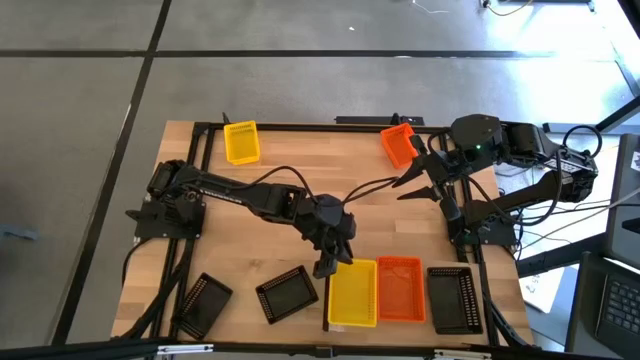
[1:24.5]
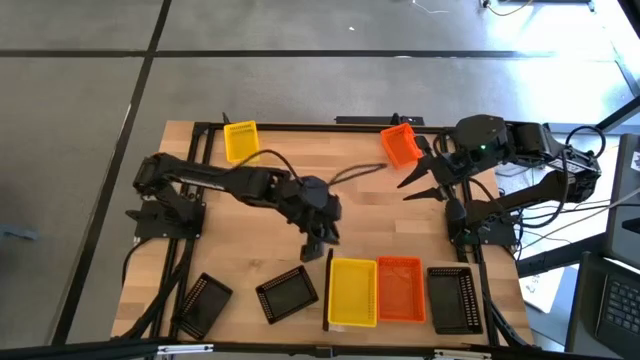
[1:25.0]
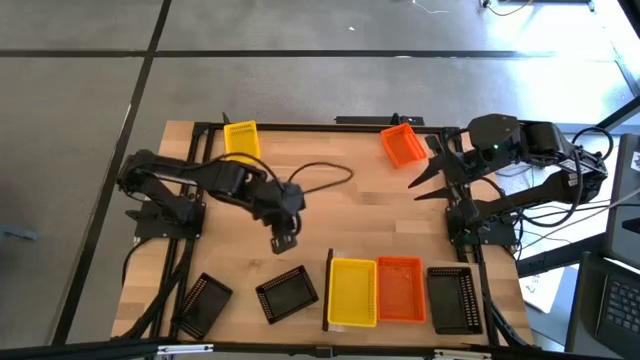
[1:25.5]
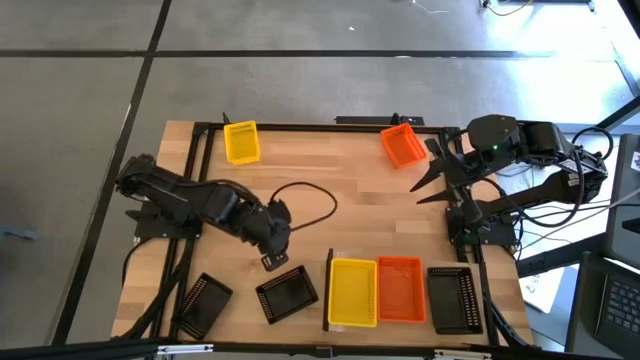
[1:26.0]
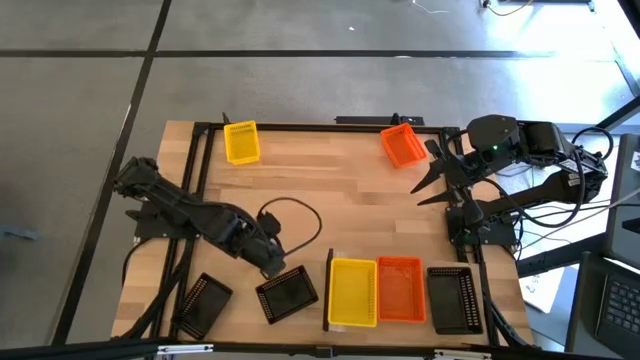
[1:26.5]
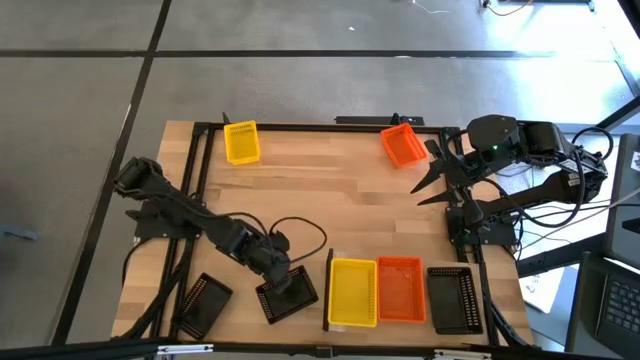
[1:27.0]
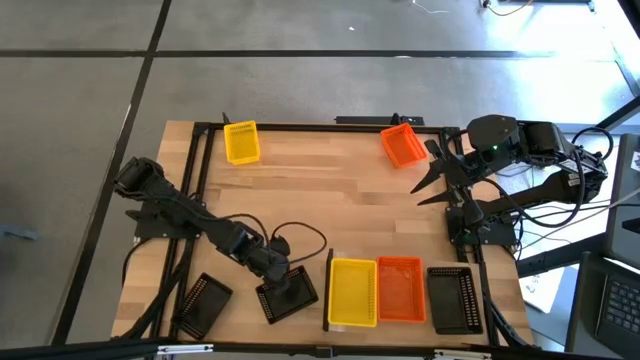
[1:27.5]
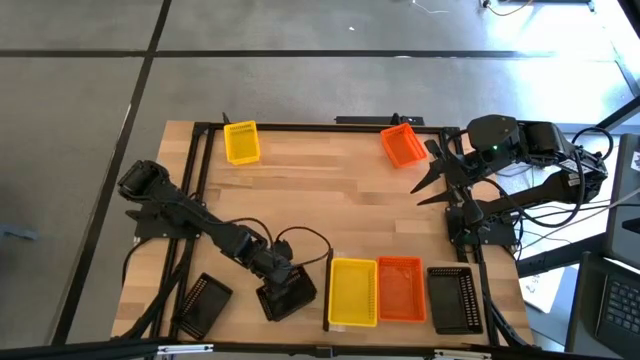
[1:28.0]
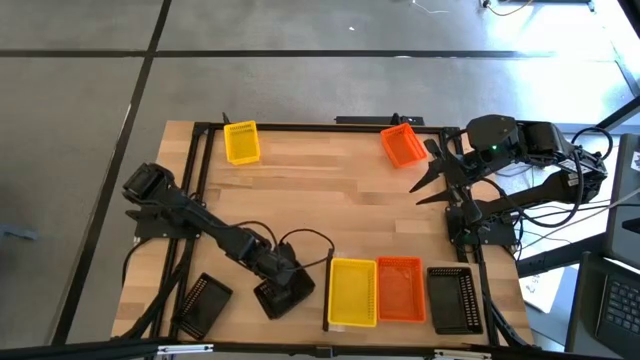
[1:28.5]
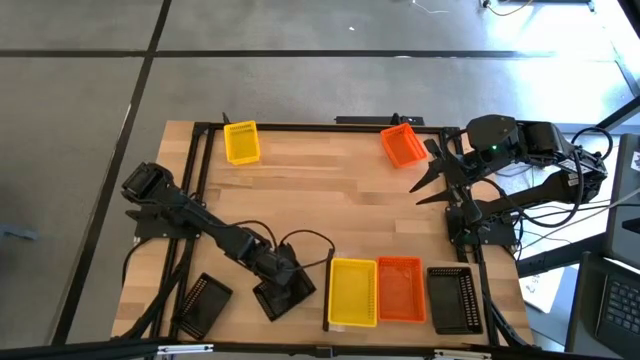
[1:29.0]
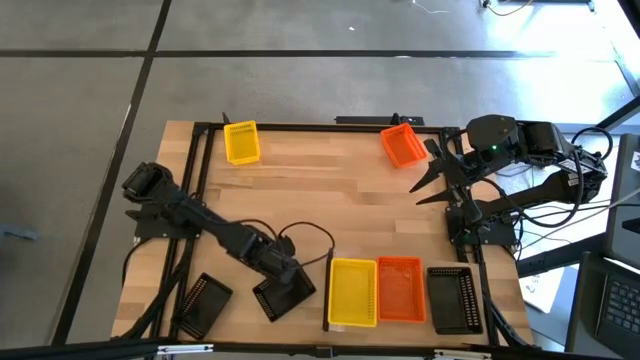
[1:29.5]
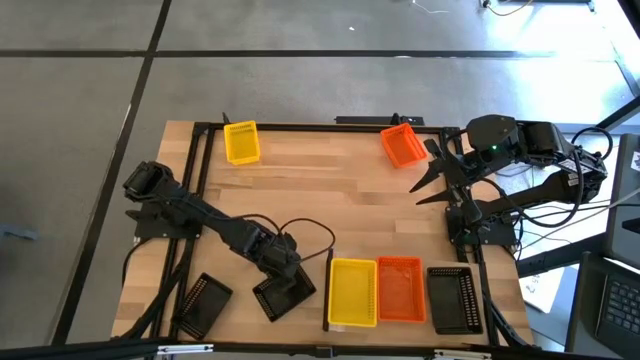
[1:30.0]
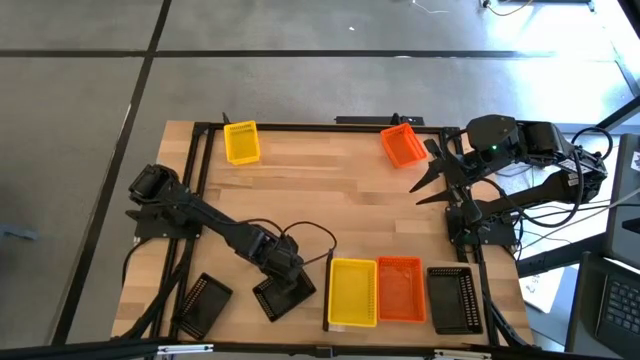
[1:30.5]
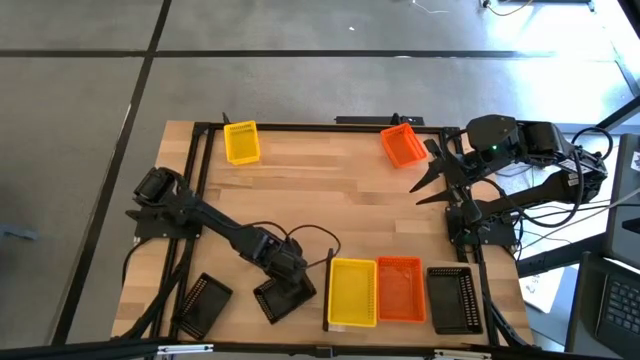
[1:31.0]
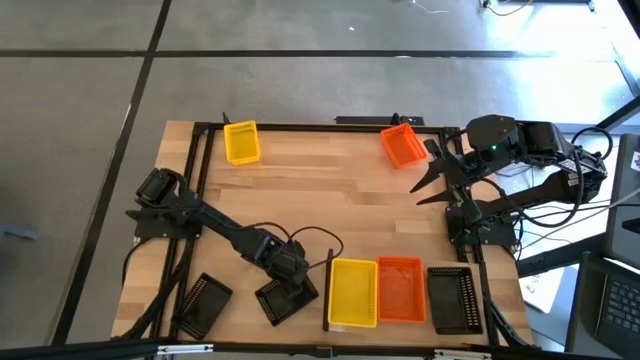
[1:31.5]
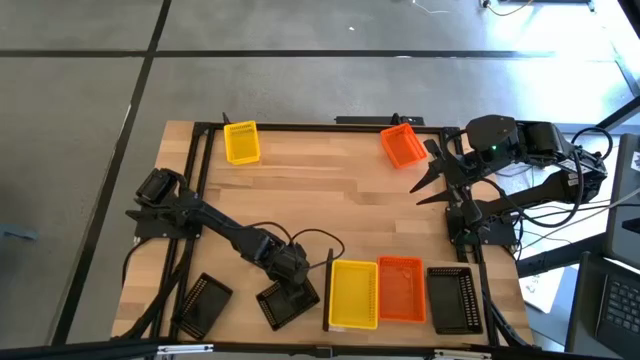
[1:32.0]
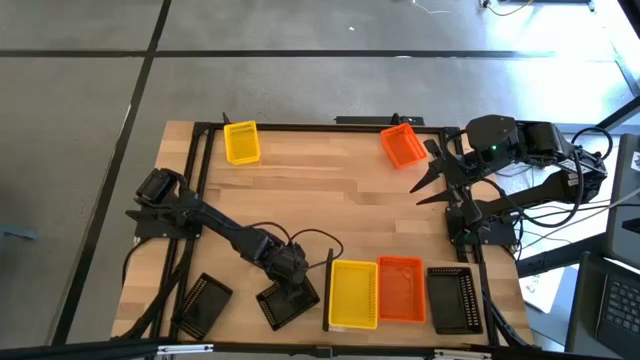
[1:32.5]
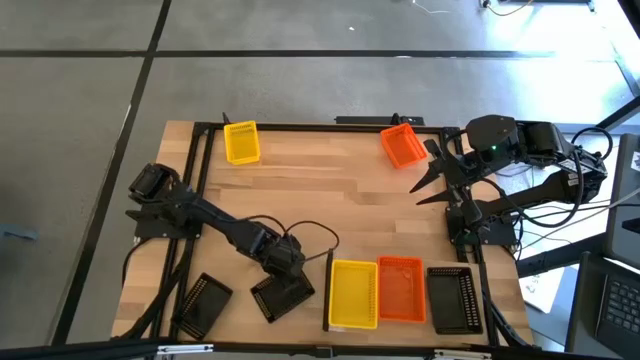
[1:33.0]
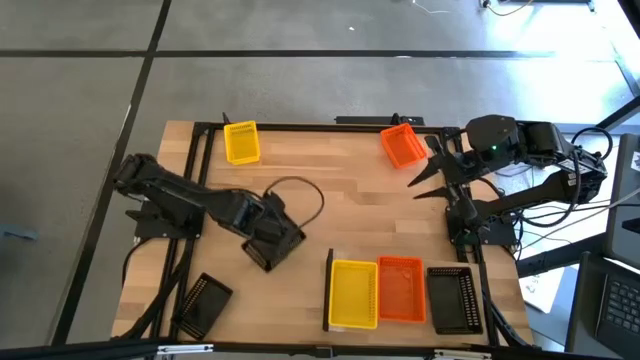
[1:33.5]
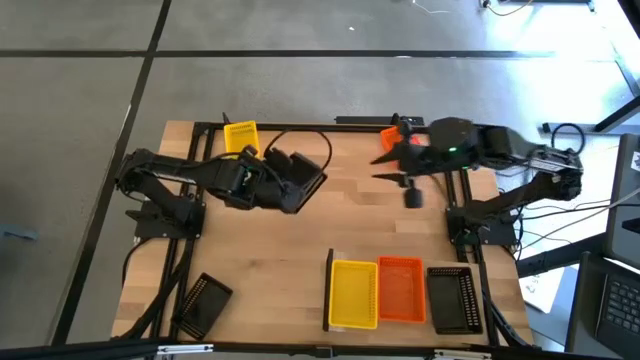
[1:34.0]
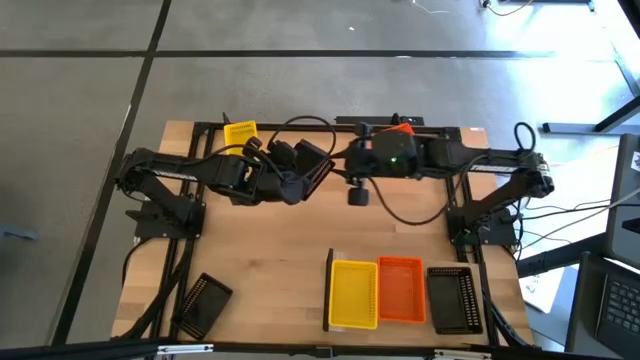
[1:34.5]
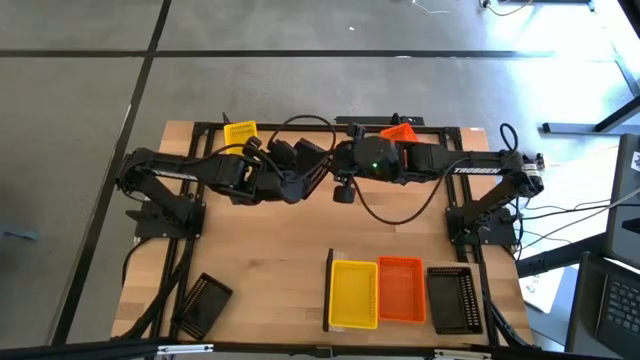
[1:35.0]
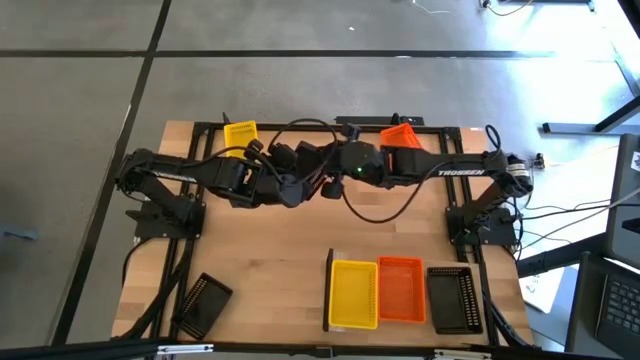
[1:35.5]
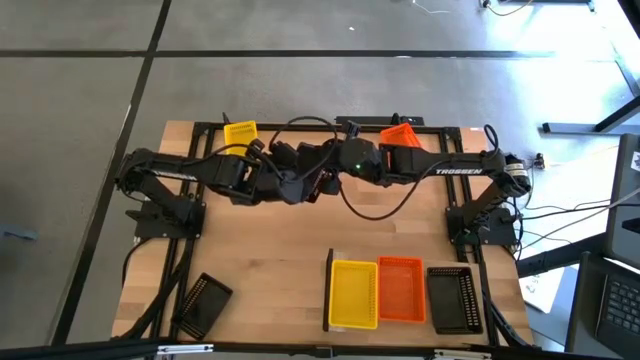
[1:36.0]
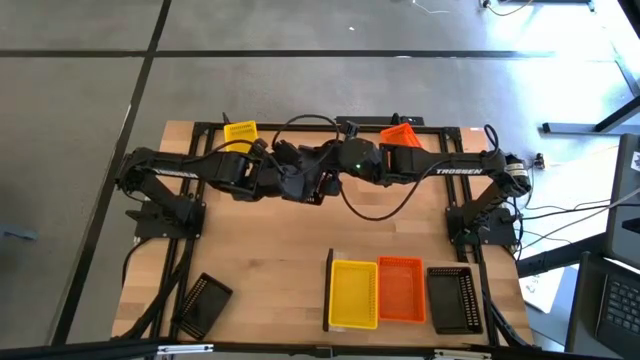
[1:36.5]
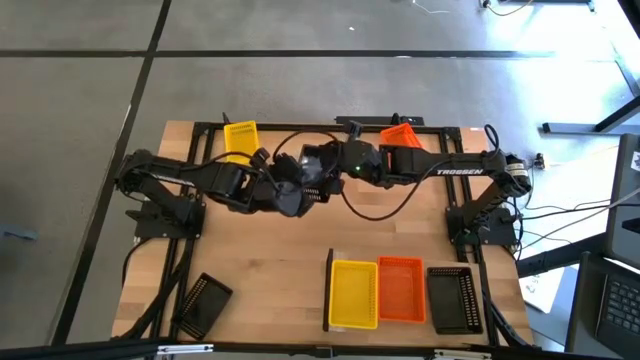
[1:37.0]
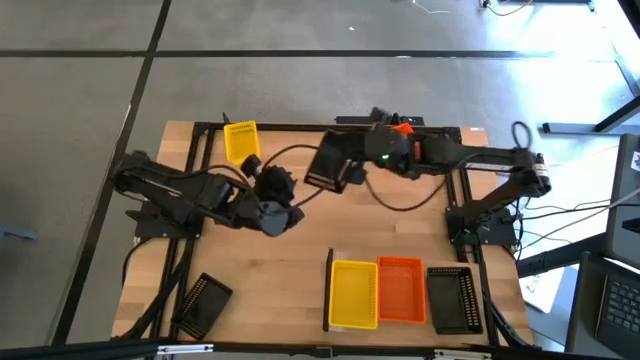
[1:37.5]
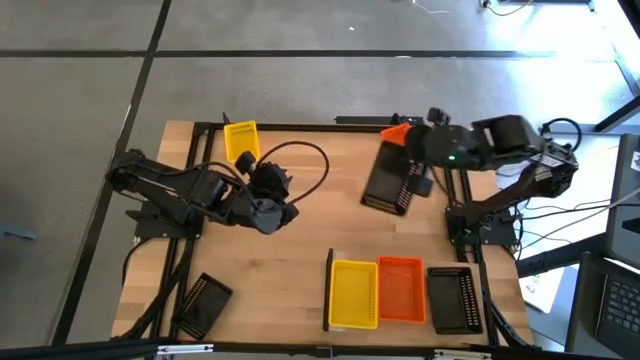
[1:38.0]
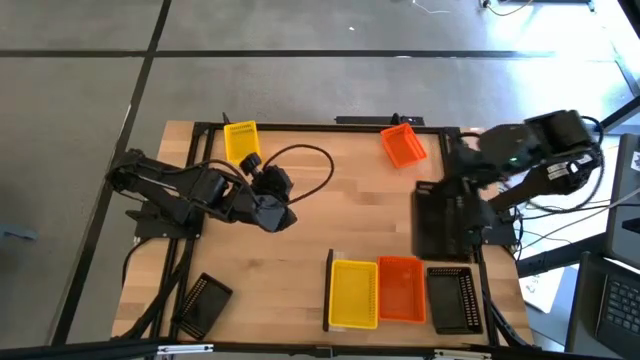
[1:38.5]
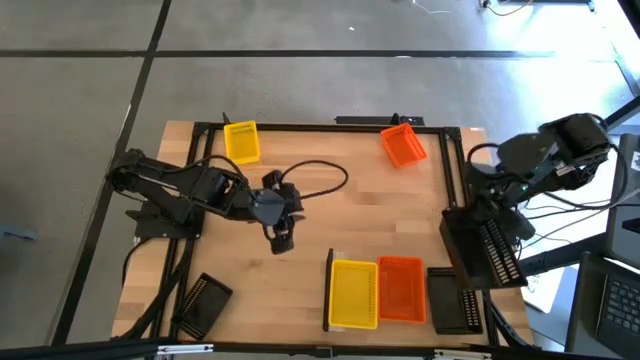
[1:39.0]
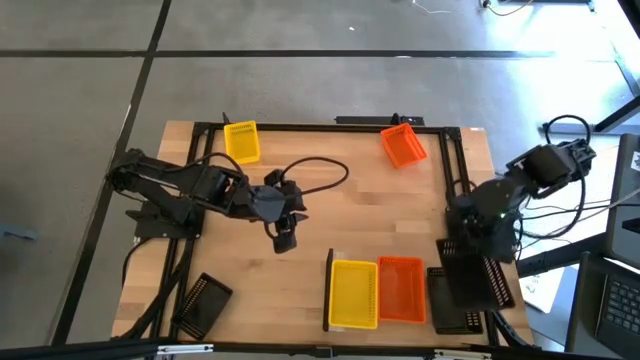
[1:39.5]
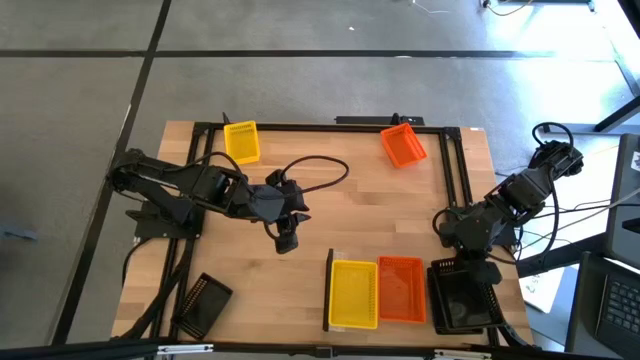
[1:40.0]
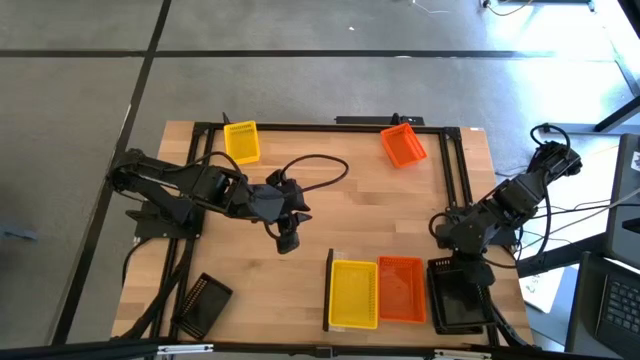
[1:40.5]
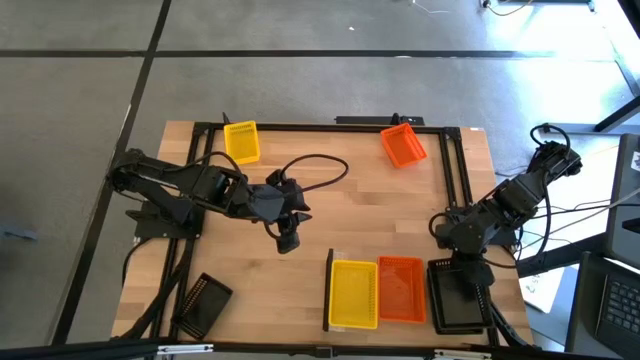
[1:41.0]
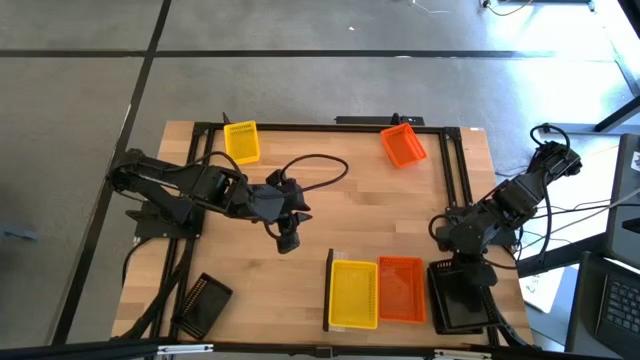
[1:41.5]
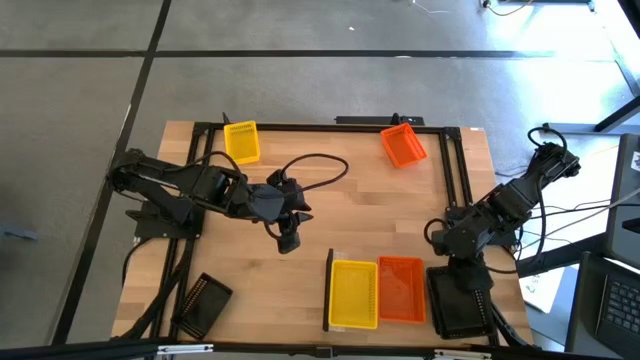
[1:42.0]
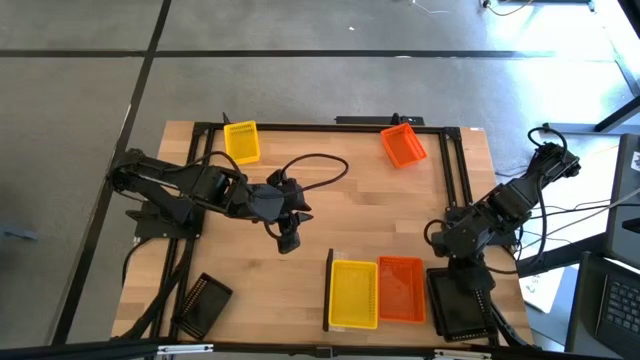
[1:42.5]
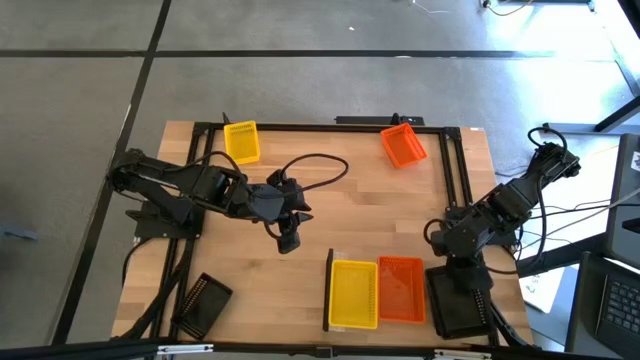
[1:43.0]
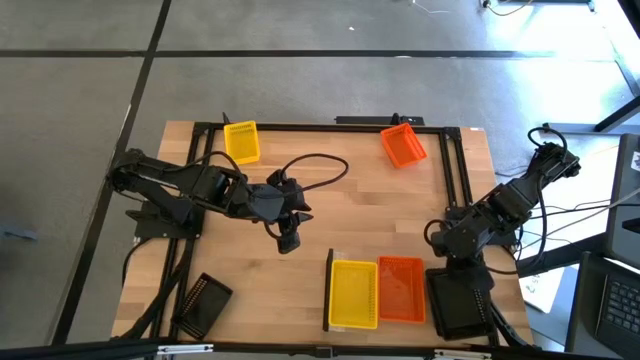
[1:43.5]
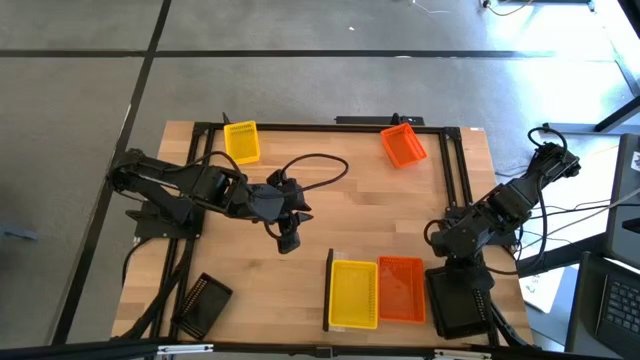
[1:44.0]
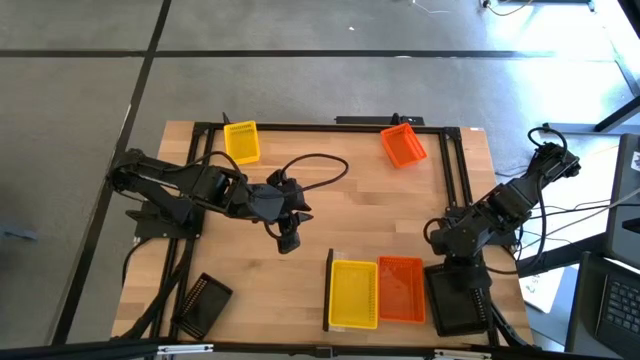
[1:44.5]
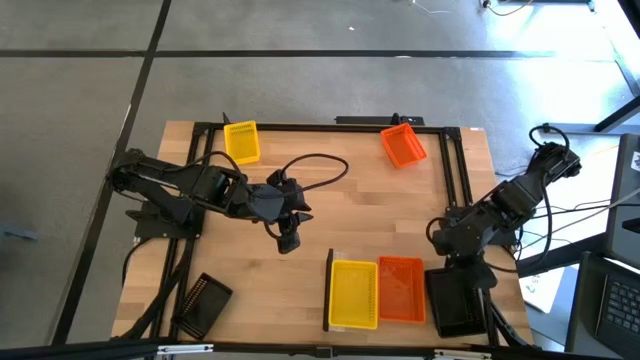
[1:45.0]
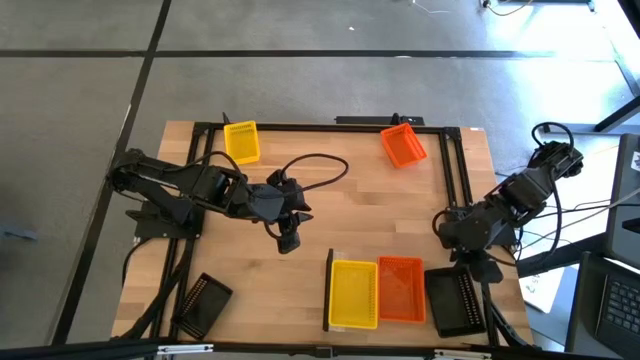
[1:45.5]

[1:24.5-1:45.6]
Task: Stack baskets on shelf by color
Stack the right black bin on top of the black bin

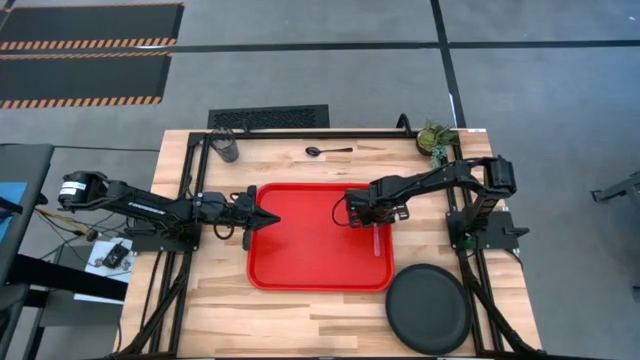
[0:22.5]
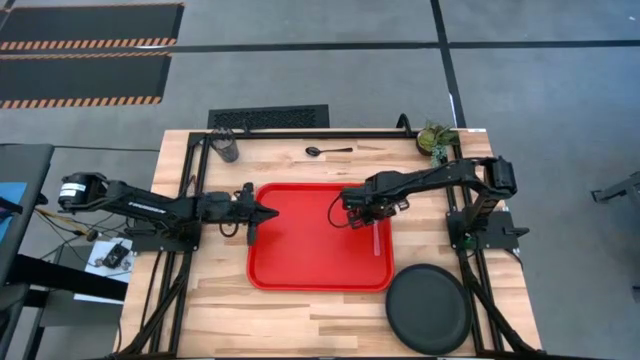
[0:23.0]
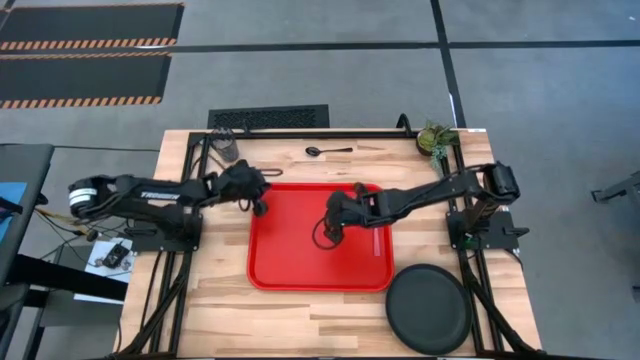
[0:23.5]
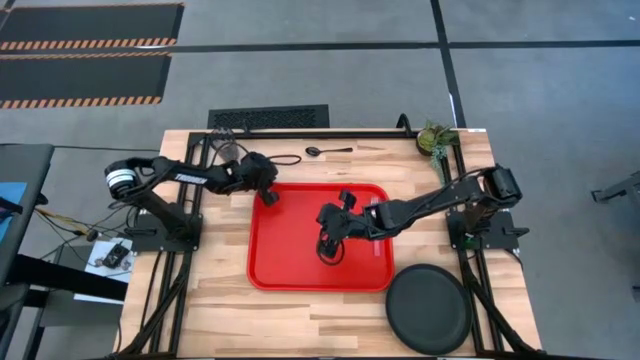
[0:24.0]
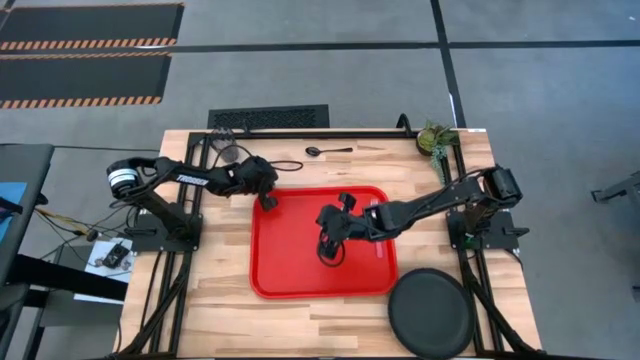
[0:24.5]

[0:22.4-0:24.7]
Task: Pick and place plate/cup/fork/spoon on tray
Adjust the red tray
